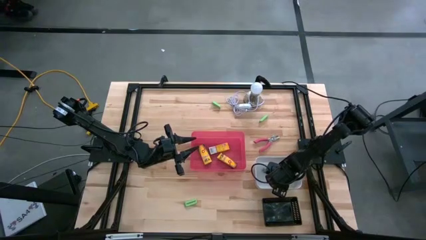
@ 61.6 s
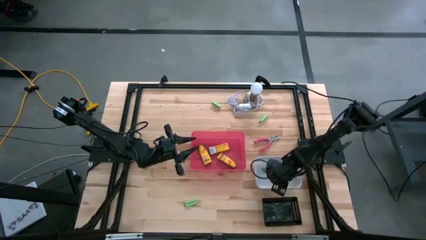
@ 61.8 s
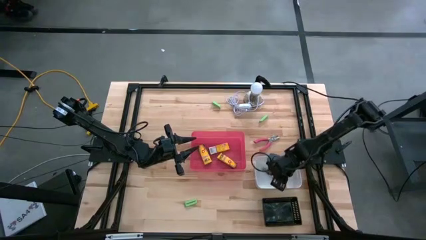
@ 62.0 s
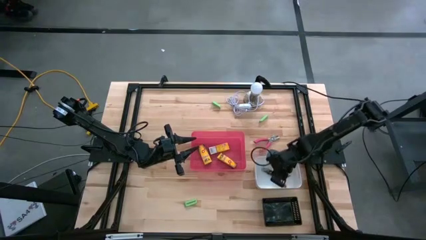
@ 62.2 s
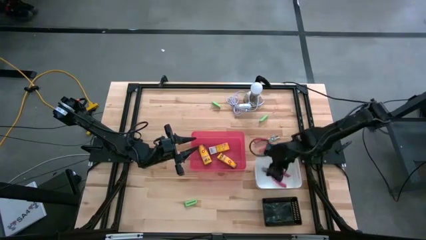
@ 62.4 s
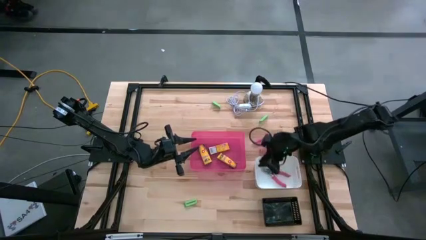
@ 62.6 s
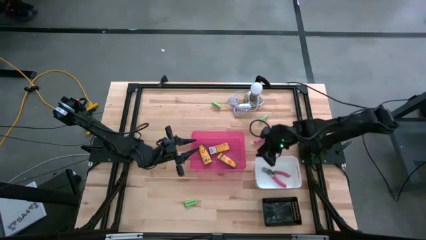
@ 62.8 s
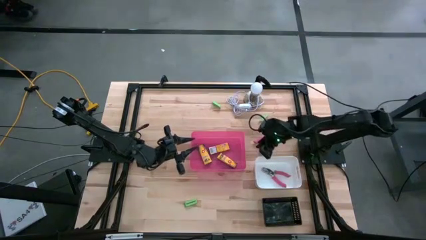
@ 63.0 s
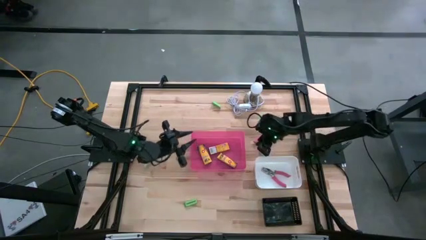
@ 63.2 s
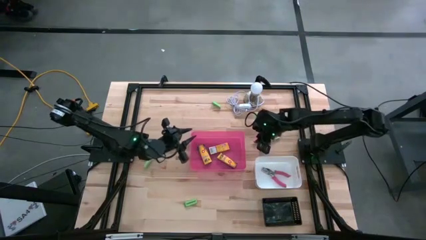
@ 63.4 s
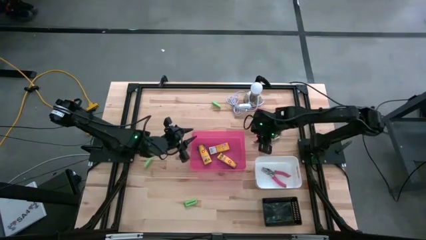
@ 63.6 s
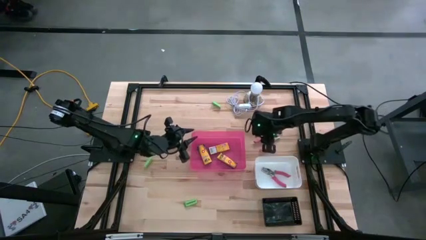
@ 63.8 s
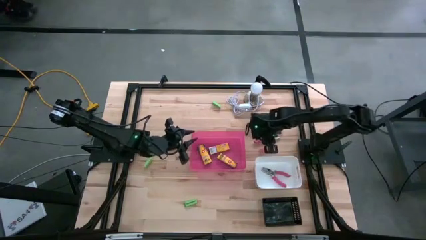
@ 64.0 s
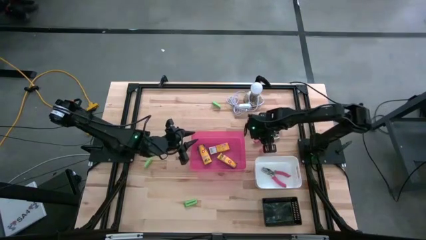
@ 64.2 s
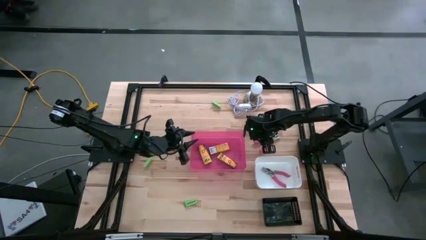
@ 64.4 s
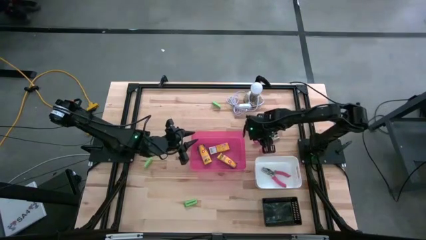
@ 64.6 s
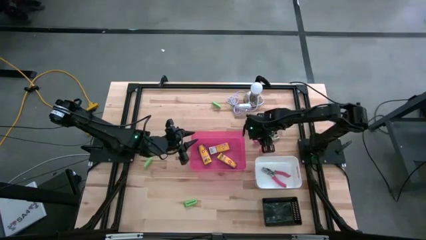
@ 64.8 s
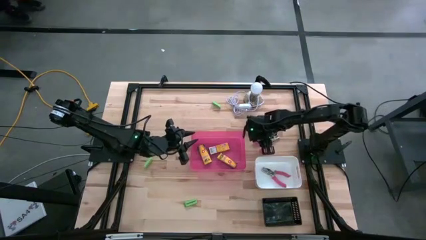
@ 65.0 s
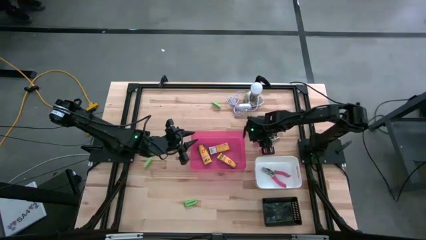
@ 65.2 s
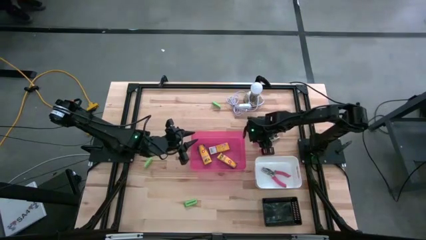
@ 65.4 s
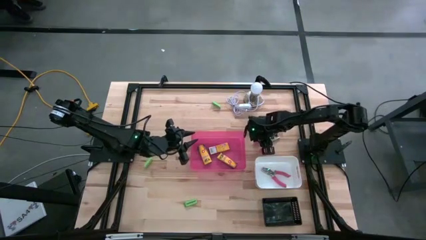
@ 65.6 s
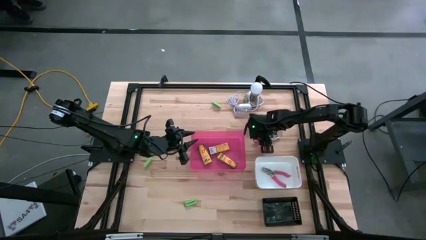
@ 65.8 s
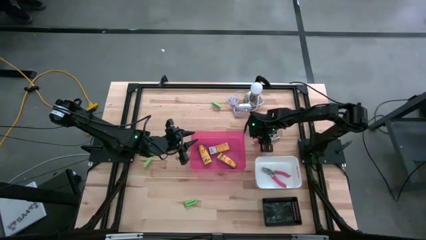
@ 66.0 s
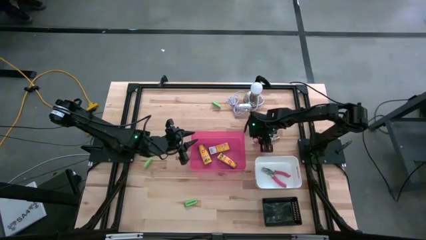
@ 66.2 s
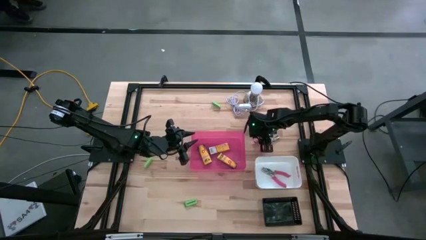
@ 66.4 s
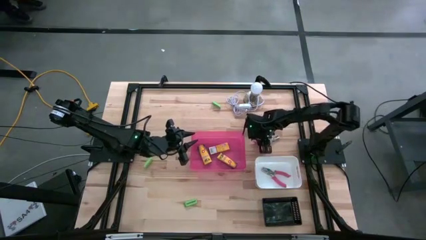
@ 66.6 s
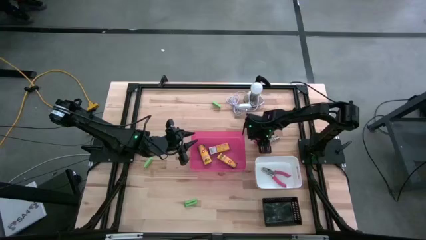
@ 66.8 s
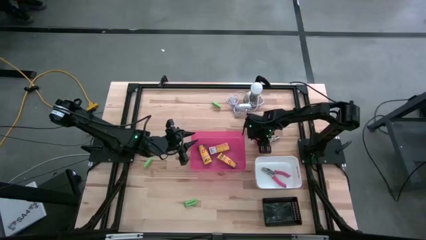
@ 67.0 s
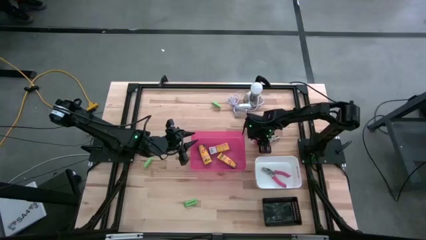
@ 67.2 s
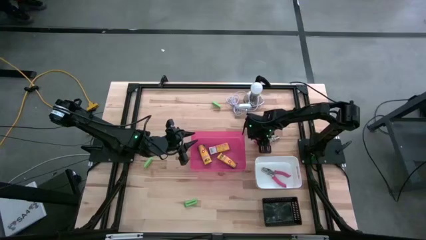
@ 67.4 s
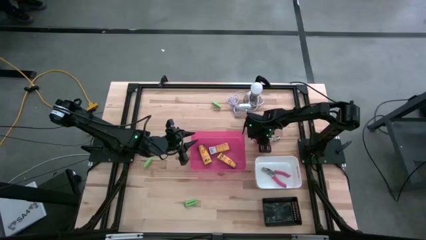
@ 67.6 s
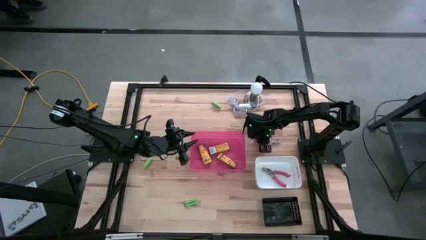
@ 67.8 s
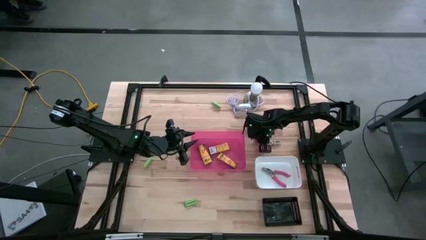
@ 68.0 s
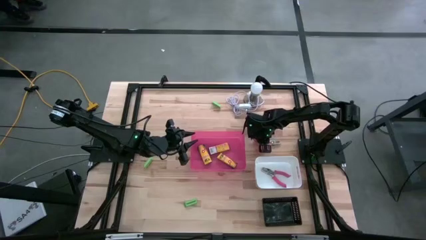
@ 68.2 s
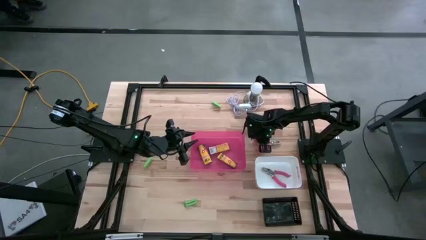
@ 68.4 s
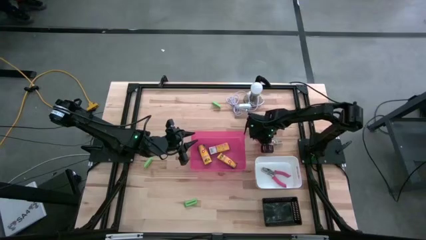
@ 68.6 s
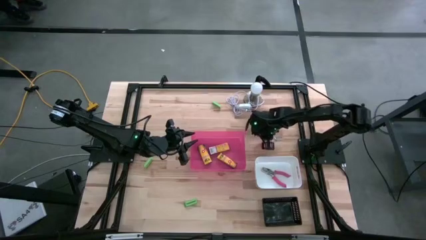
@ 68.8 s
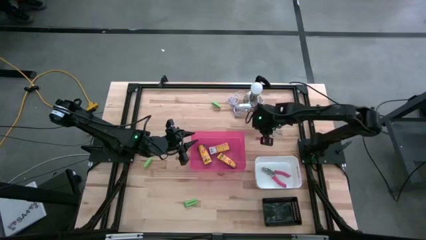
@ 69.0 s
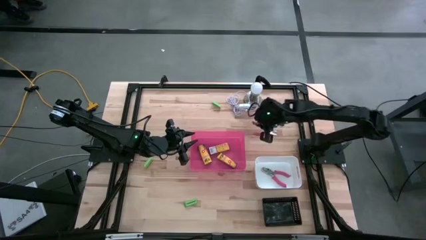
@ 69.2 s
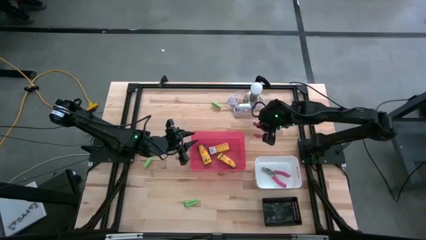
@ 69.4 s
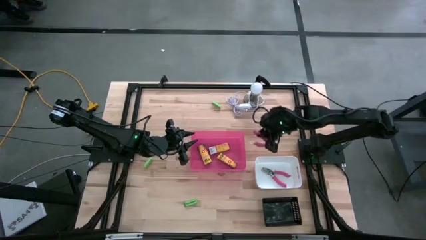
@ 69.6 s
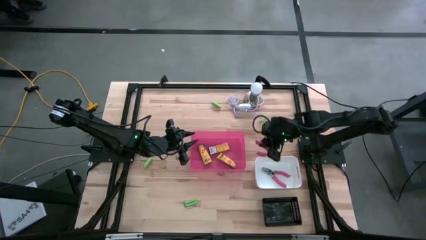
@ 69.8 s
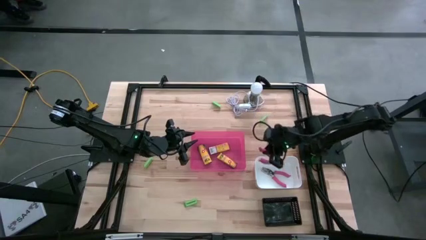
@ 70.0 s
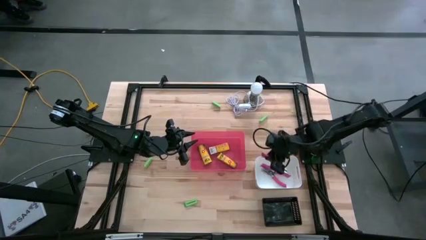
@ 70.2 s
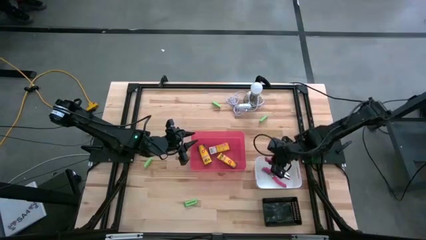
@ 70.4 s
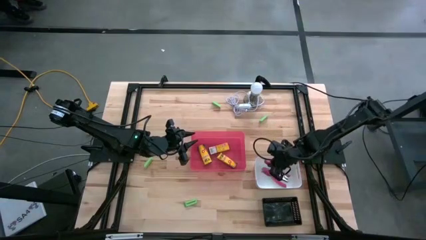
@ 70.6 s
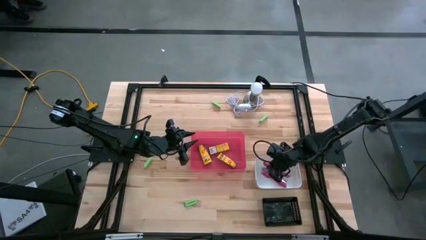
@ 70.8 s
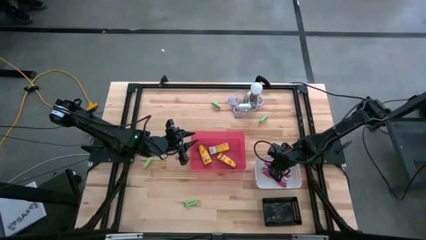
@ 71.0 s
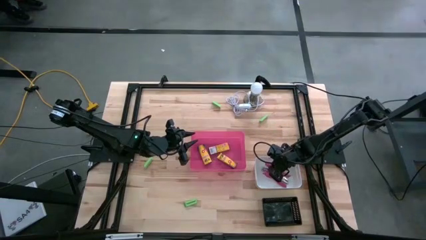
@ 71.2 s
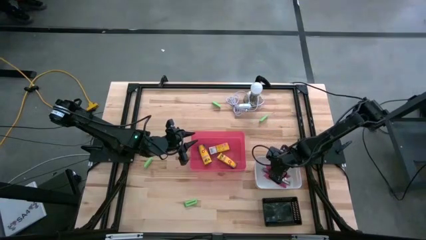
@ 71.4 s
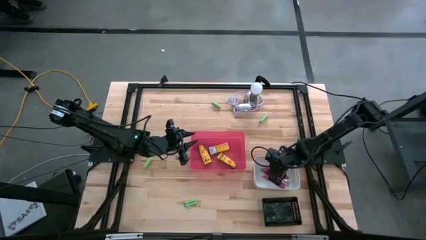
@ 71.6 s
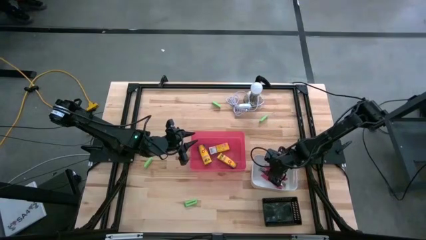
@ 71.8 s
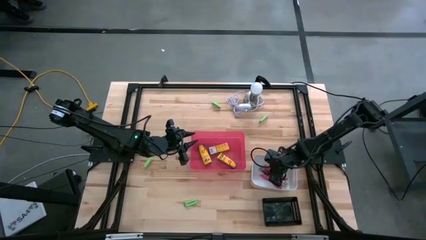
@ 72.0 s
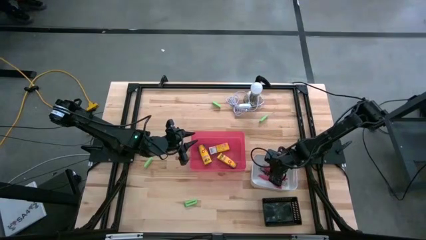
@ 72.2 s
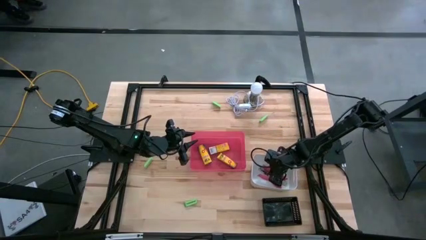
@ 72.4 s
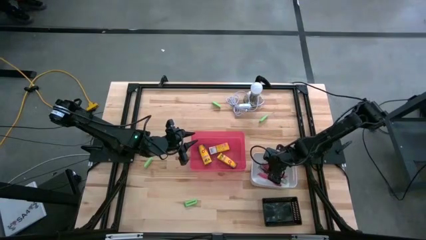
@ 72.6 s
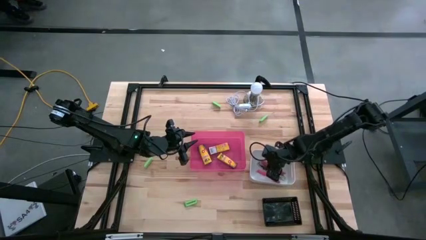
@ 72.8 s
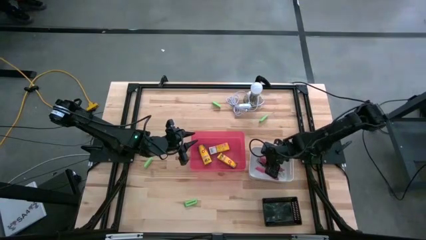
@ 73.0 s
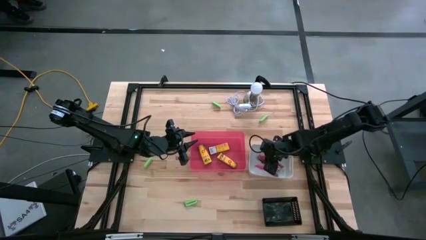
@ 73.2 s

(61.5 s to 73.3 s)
Task: Pick & Place School Supplies
Put the pink hole puncher into the white bin
